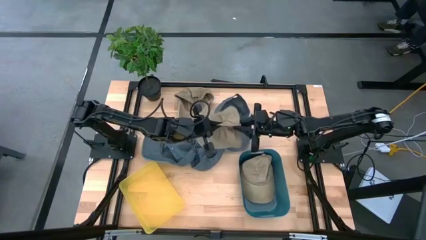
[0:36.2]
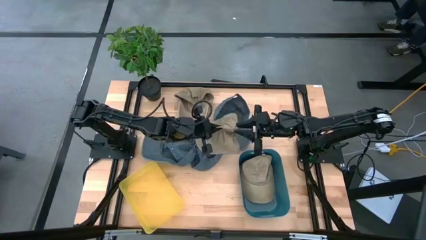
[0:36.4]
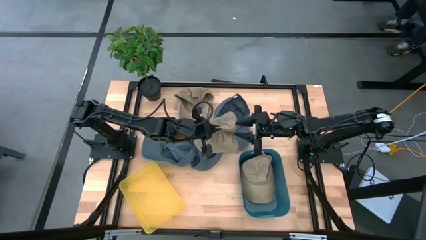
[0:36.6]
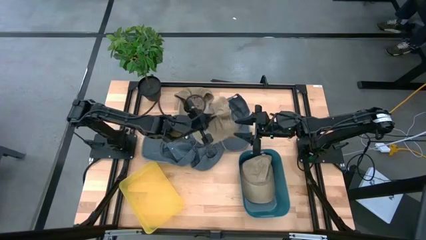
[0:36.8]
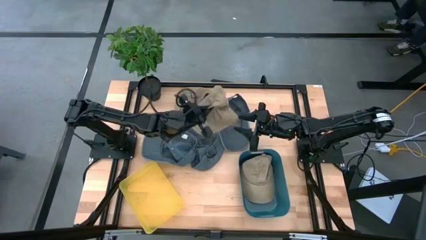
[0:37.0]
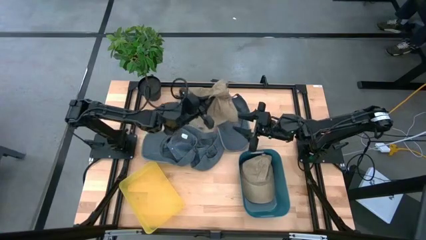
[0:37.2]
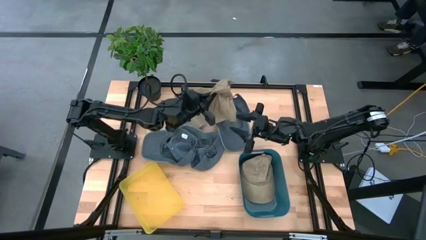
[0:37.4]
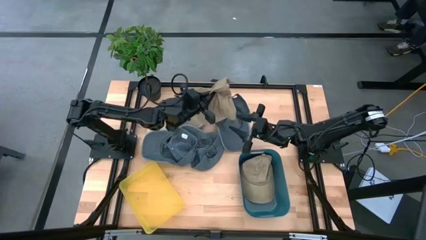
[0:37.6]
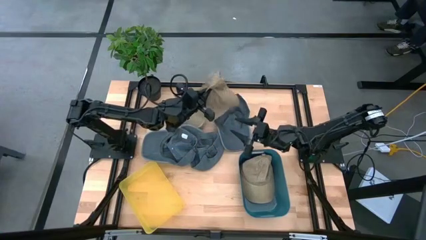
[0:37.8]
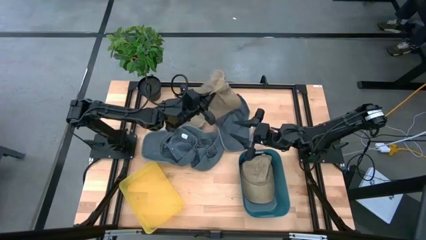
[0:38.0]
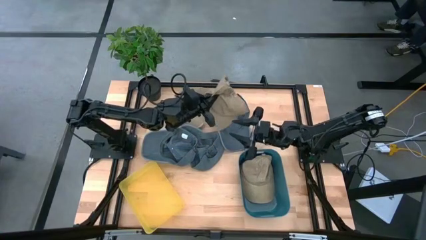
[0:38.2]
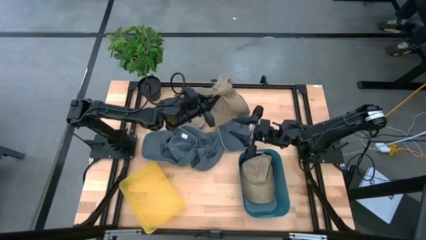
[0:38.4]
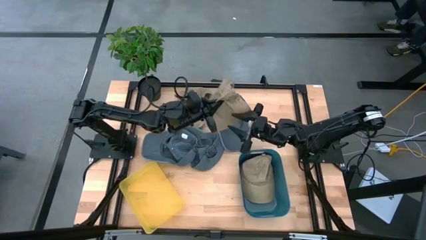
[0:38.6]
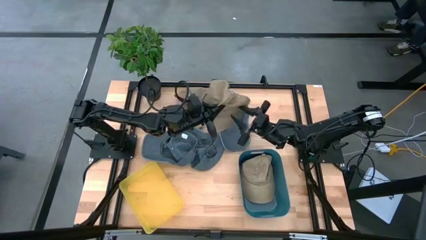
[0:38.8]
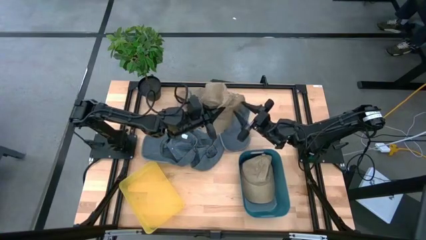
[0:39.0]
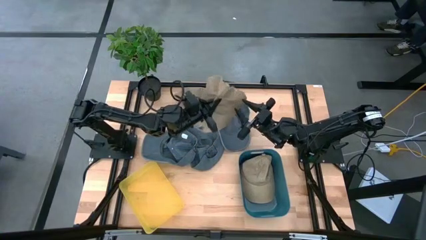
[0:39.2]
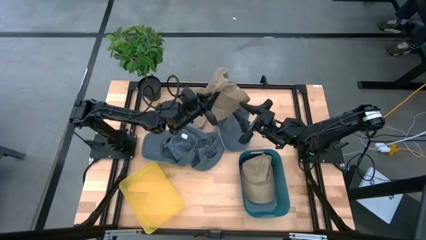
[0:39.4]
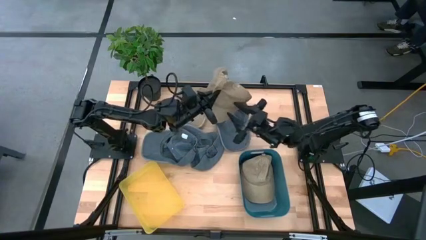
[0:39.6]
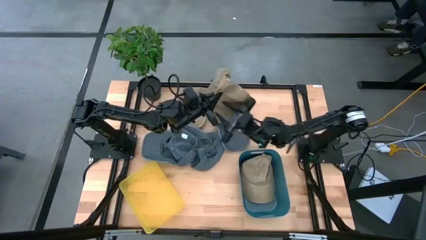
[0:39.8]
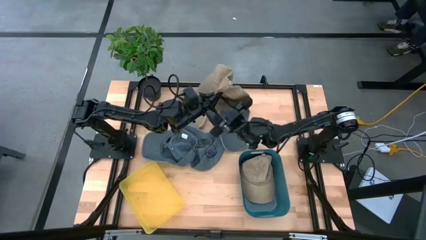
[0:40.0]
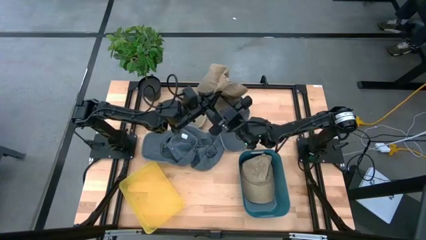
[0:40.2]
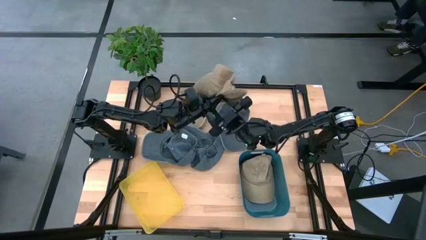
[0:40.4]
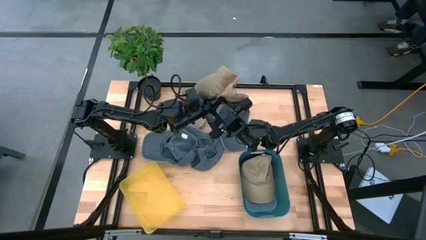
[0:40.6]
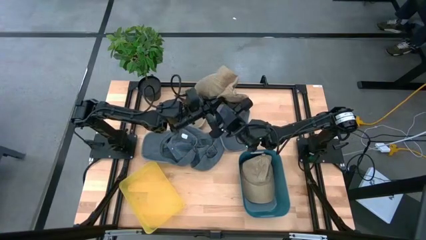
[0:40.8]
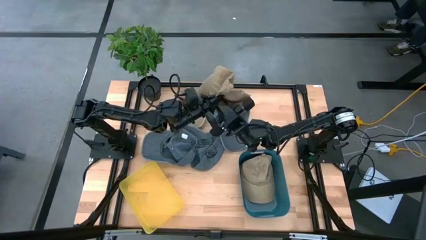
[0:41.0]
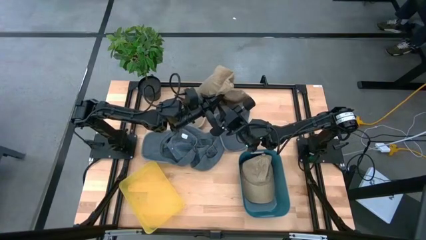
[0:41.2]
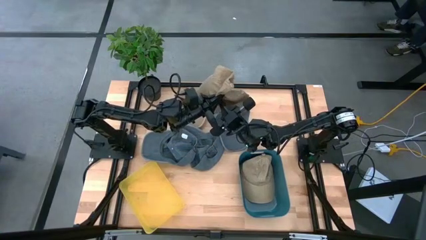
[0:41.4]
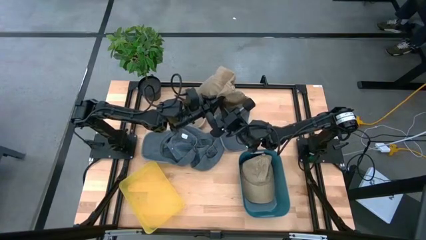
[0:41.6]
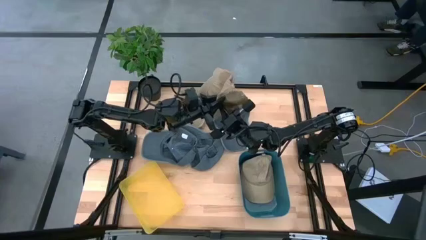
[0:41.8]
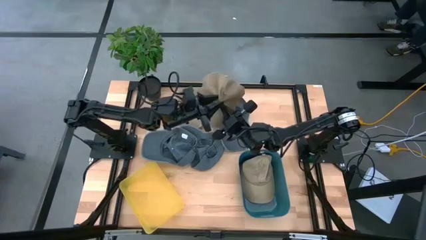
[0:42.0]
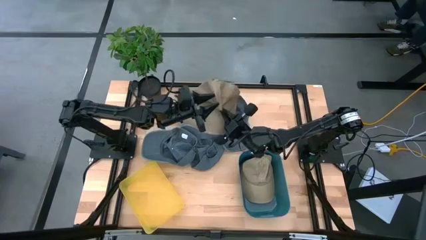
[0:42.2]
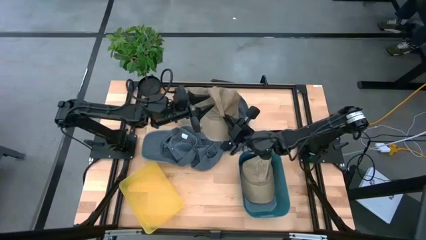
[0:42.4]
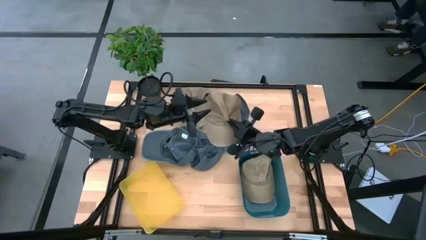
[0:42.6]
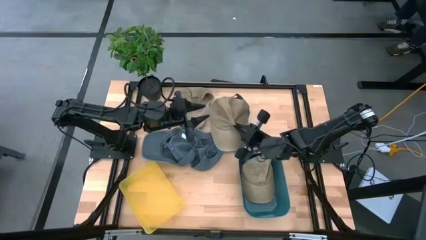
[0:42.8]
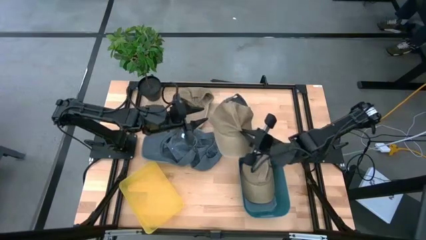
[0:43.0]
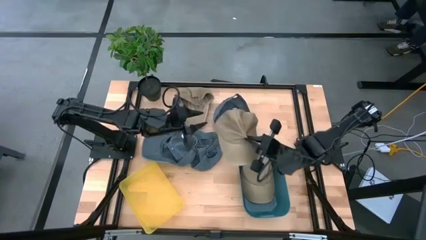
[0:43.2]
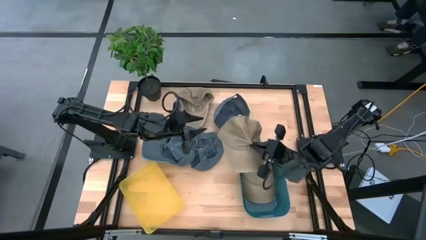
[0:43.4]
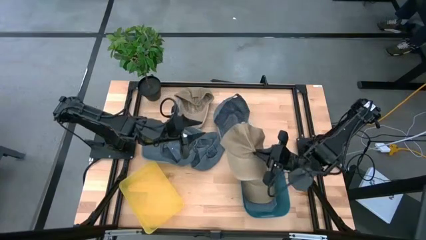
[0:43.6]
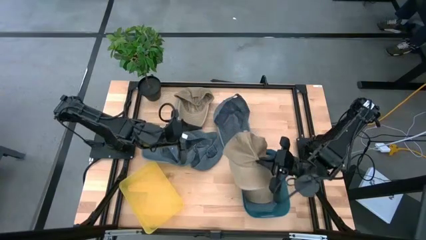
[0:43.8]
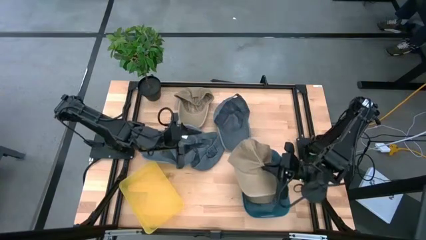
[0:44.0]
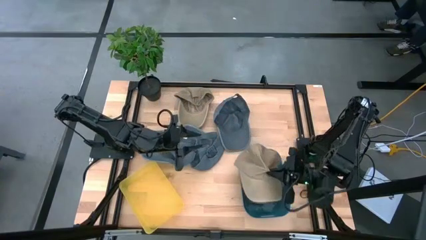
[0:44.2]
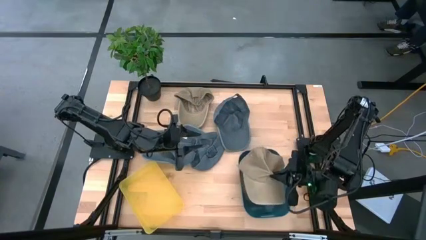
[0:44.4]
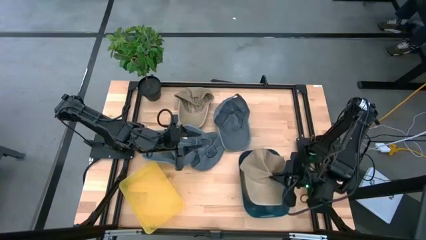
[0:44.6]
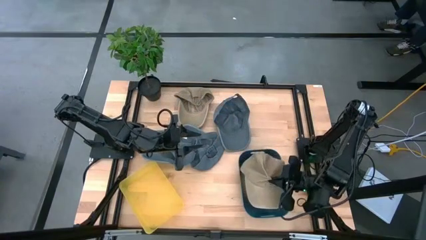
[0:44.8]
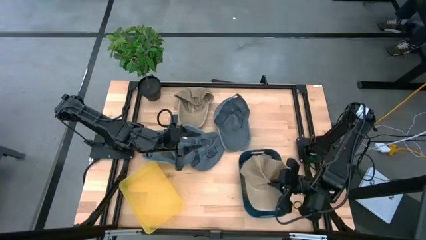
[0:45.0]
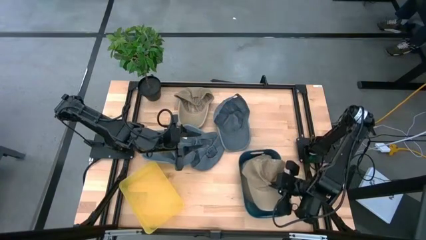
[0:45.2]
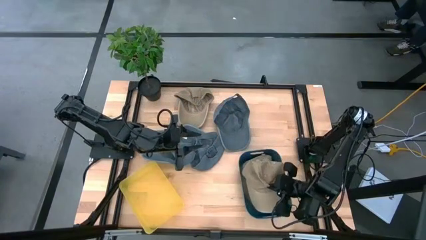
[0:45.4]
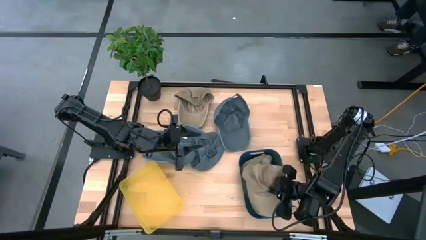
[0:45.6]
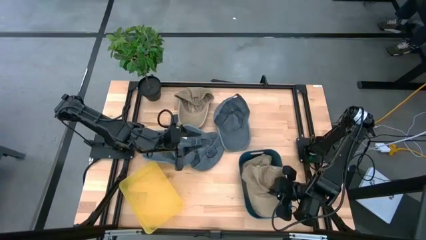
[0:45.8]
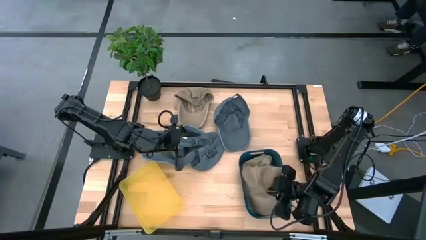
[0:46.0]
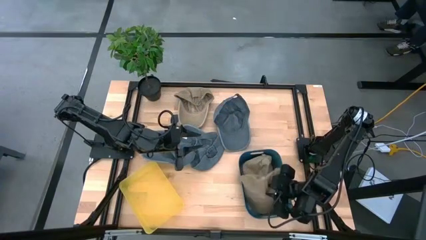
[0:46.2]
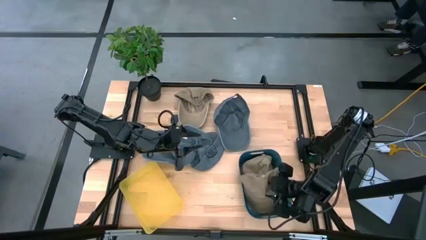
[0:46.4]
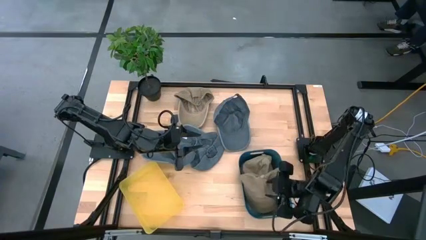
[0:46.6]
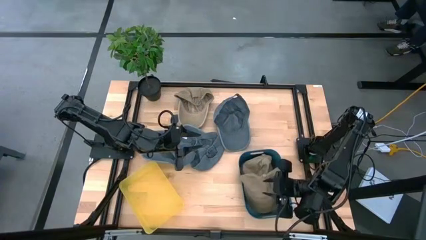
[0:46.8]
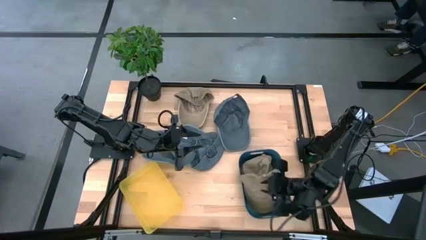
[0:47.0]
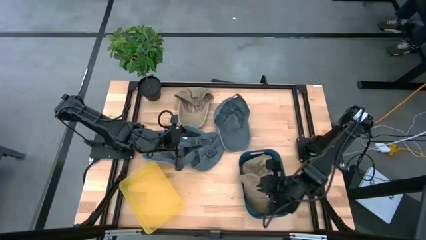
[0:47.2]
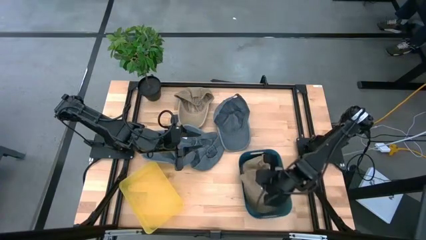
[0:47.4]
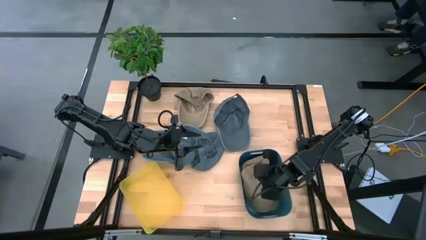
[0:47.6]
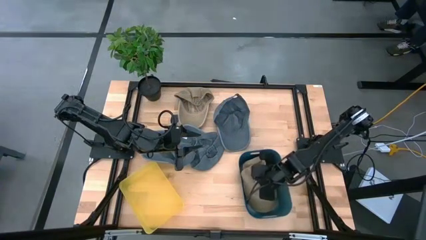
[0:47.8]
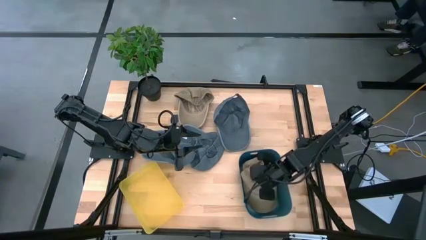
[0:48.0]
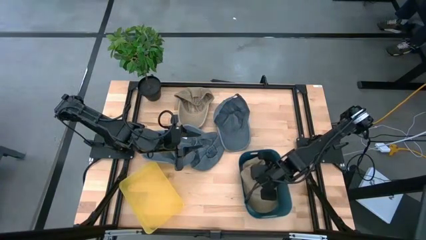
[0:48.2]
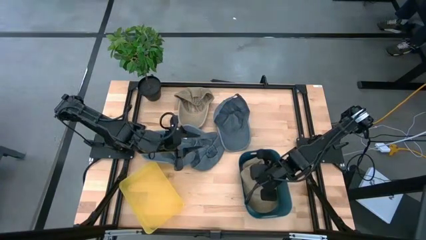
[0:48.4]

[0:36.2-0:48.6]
Task: Pick & Place hat
Put the bottom brown cap into the blue bin

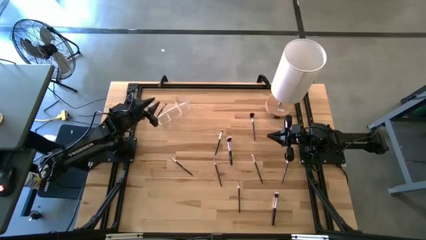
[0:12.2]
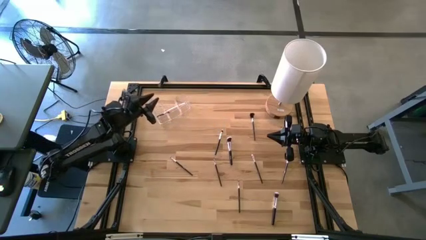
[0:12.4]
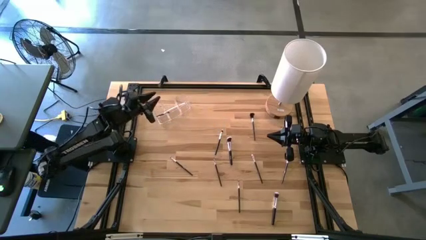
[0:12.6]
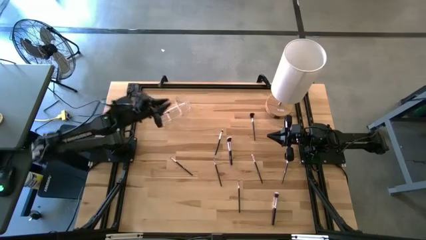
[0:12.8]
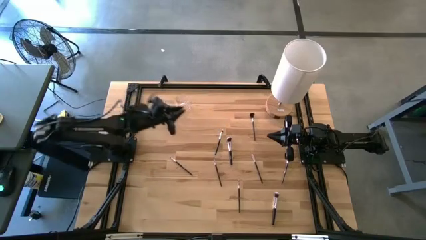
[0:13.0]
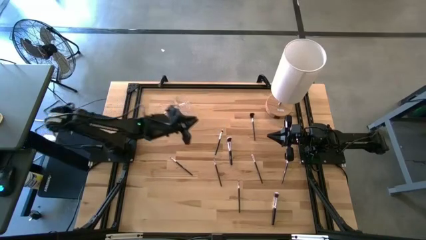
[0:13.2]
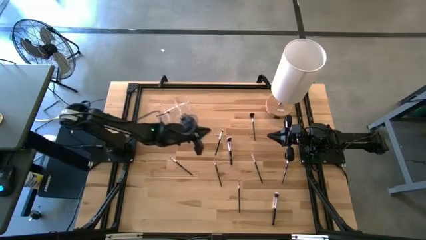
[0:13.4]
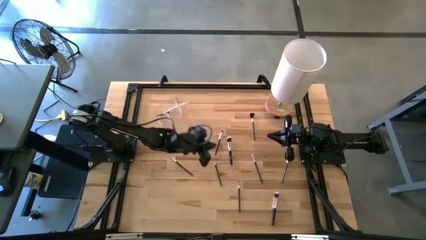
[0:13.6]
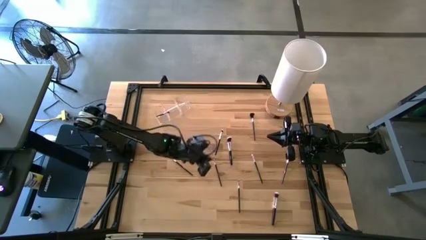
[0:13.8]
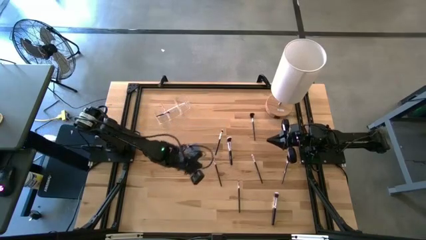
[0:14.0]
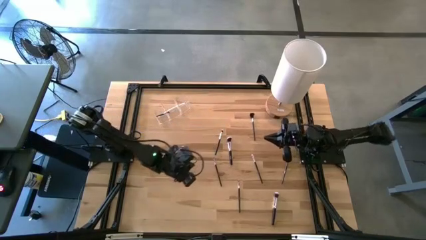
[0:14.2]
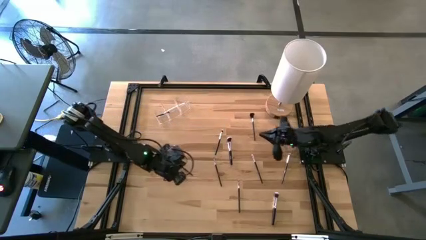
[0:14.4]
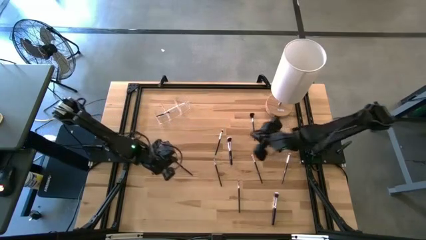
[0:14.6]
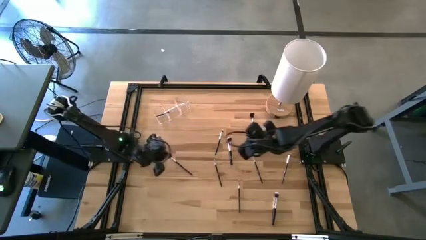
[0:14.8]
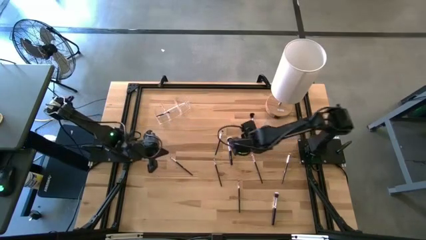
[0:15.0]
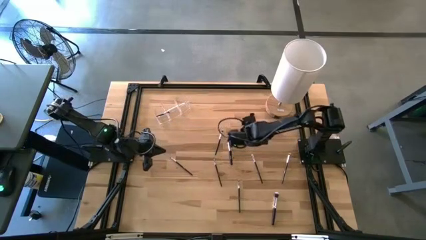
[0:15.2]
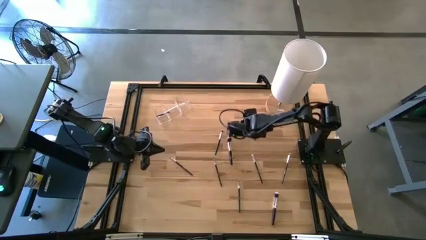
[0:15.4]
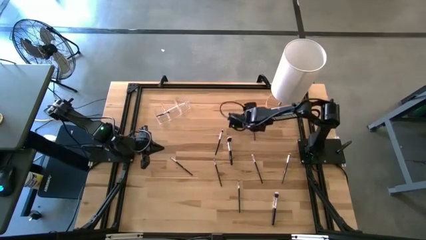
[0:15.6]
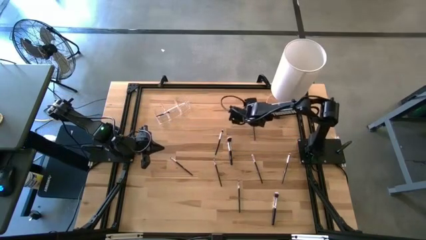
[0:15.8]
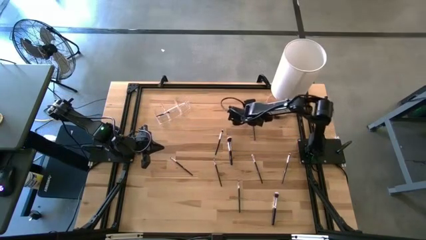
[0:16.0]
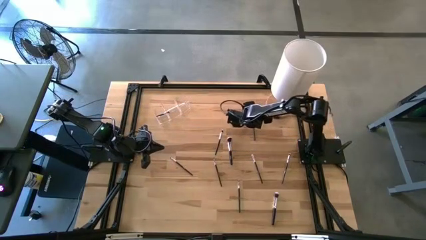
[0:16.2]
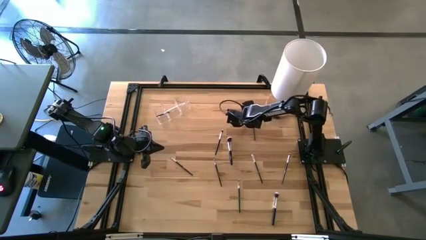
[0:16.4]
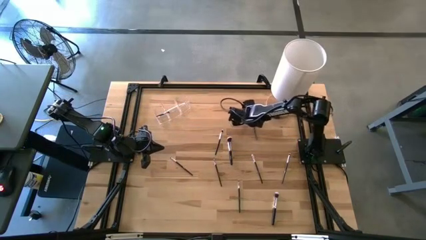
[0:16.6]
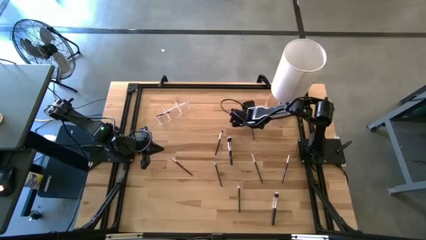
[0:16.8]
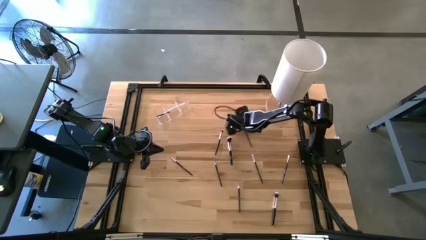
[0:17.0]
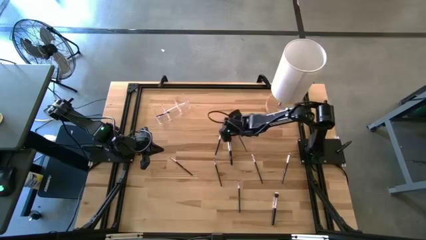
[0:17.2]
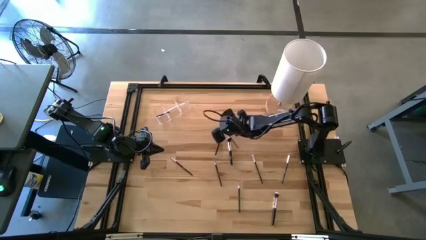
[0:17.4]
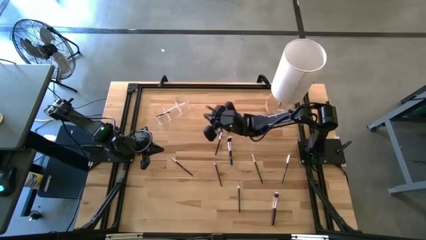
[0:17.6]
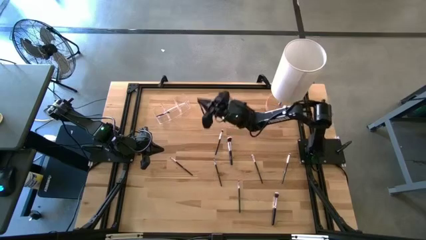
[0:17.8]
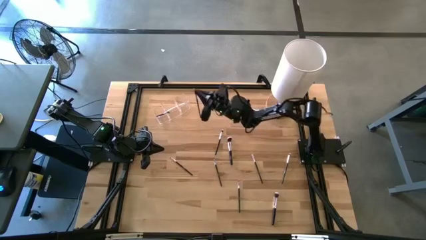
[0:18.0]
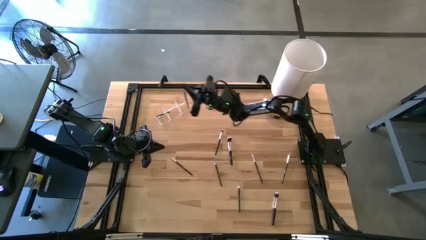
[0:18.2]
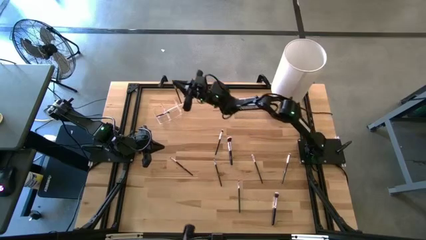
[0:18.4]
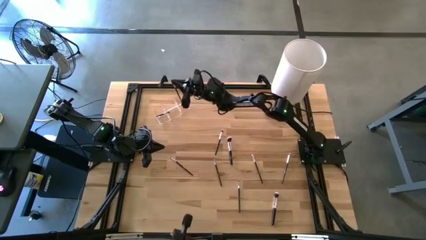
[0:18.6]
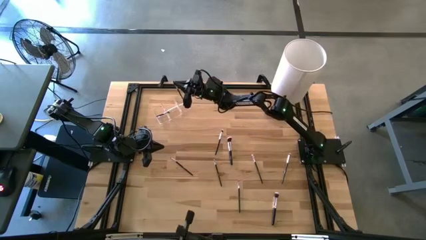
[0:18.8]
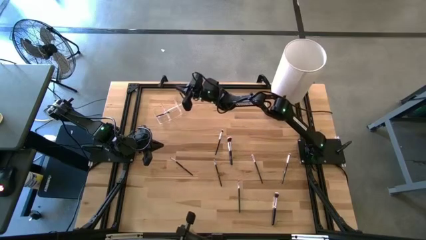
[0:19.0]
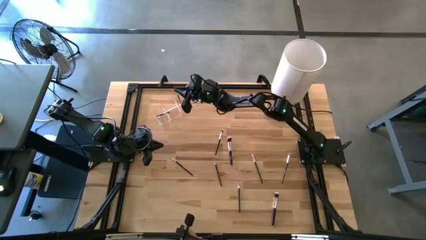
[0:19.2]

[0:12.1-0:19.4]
Task: Put items in baskets/containers
Put the eyeshadow brush into the transparent organizer
